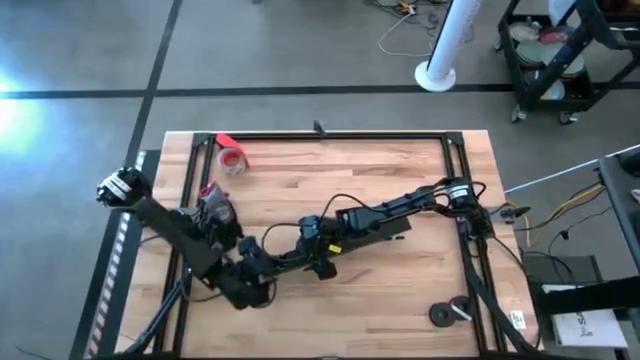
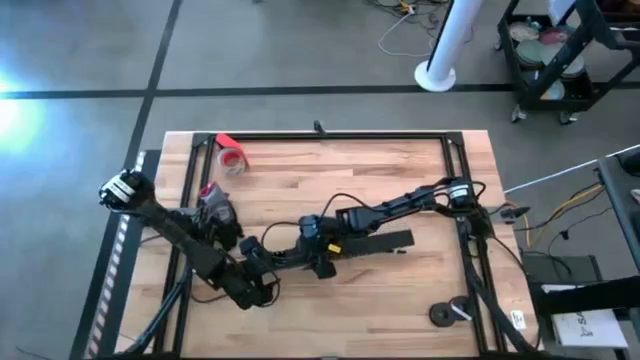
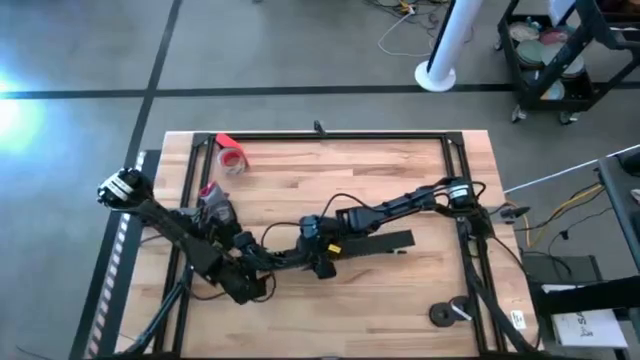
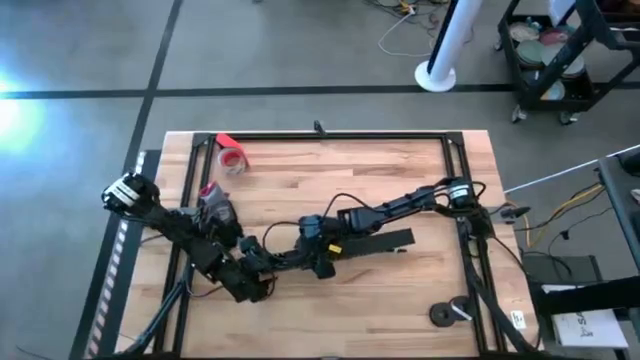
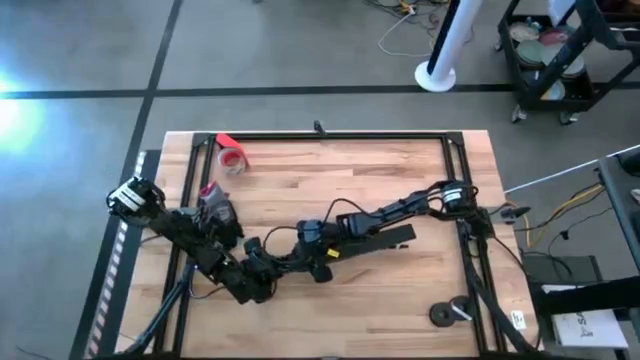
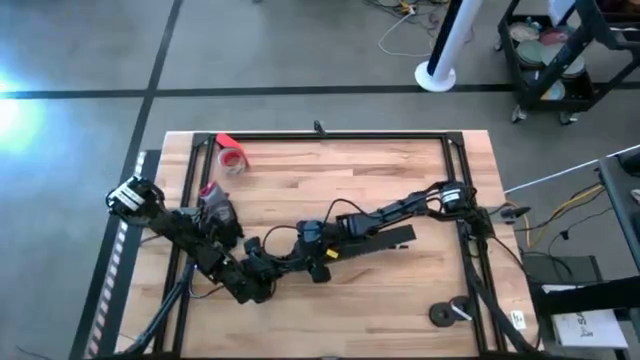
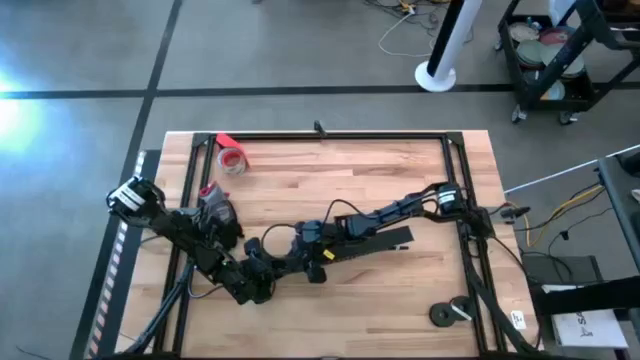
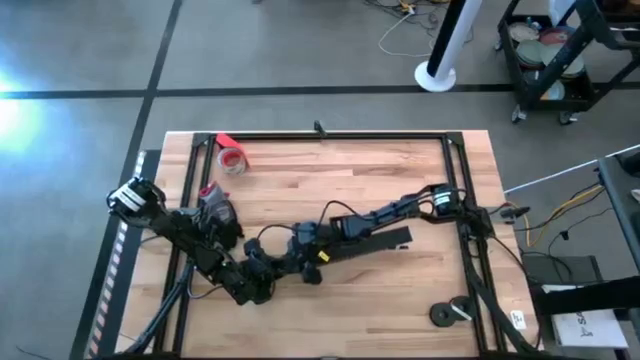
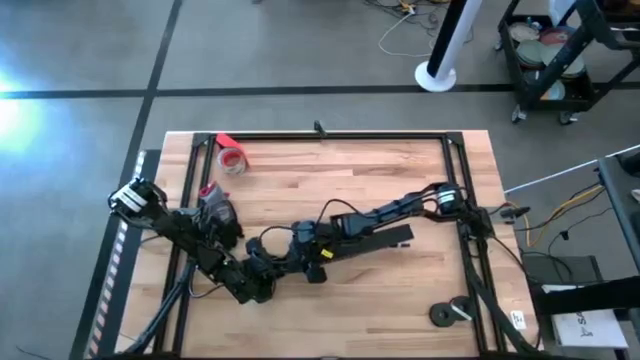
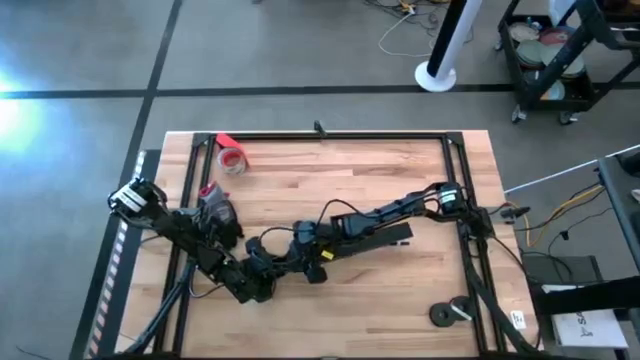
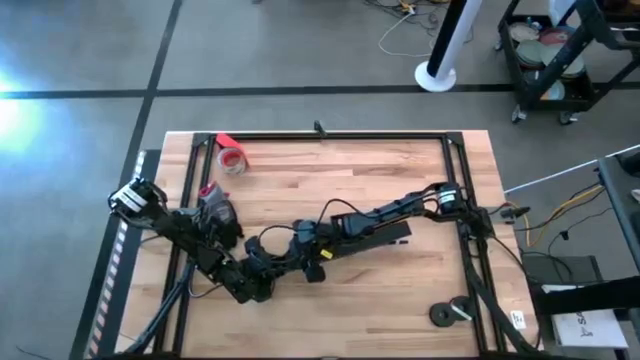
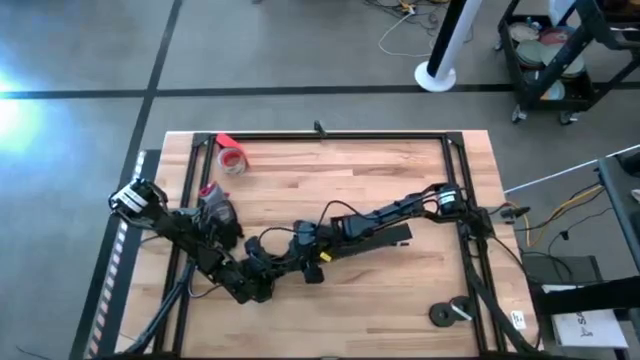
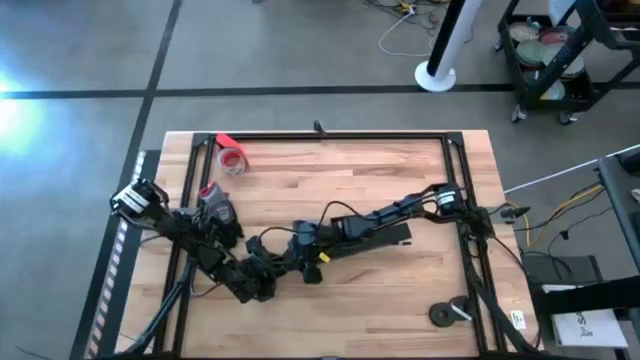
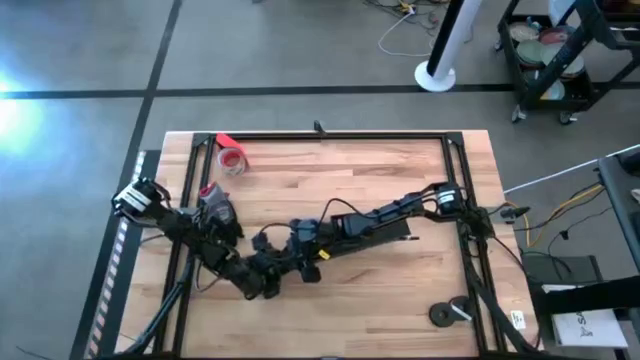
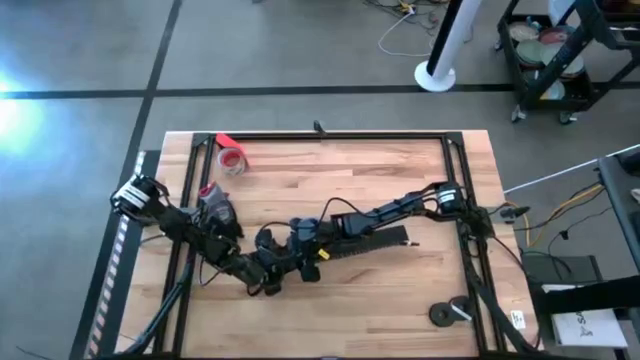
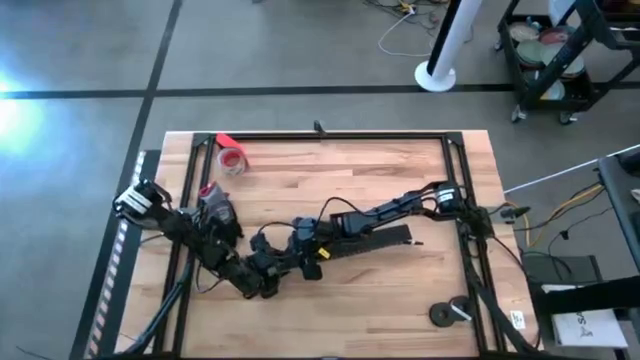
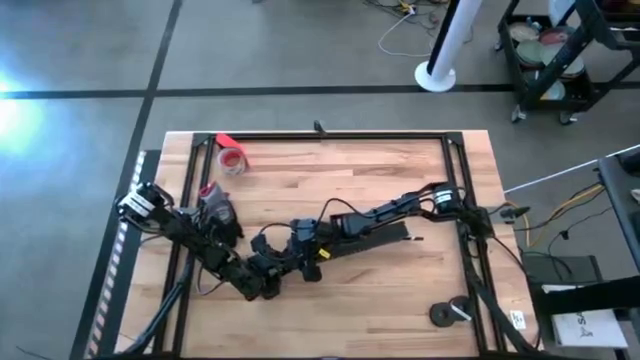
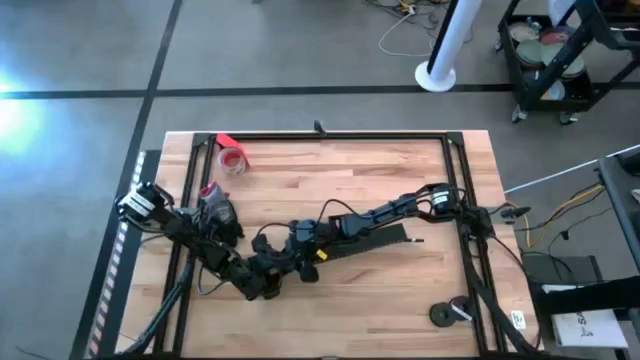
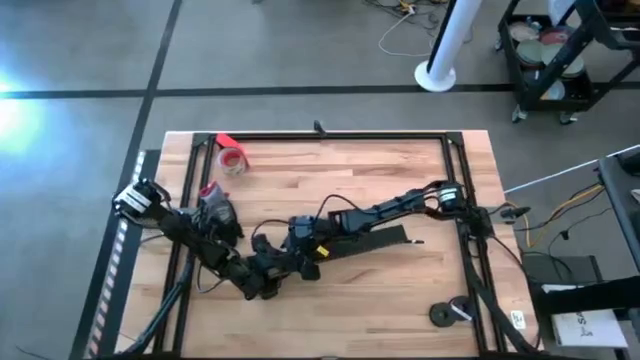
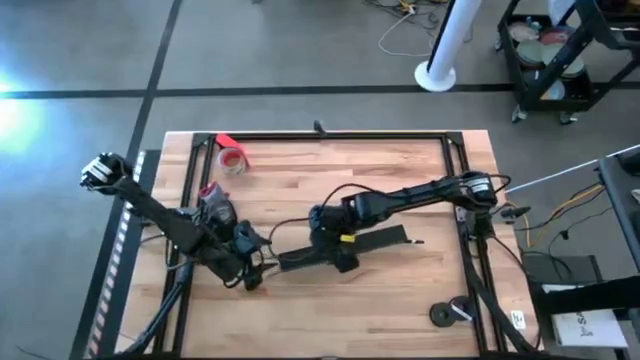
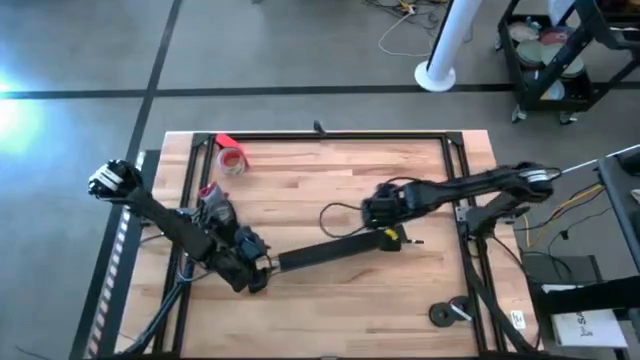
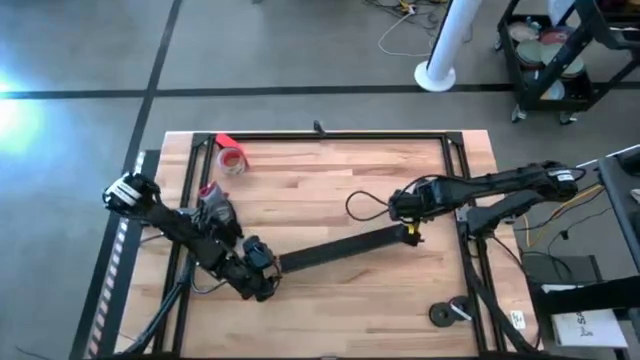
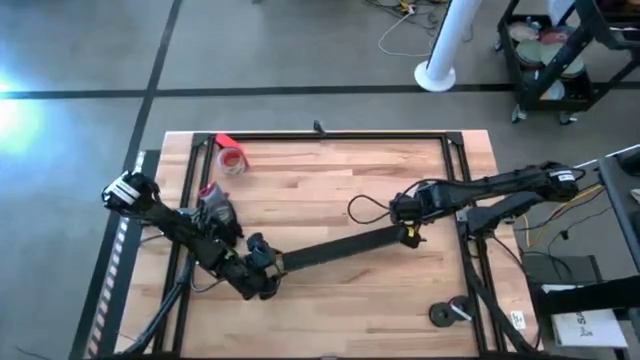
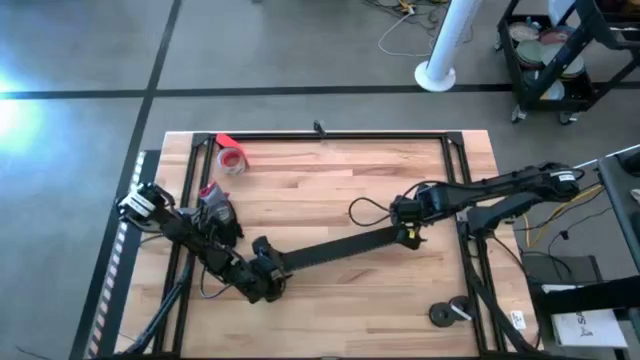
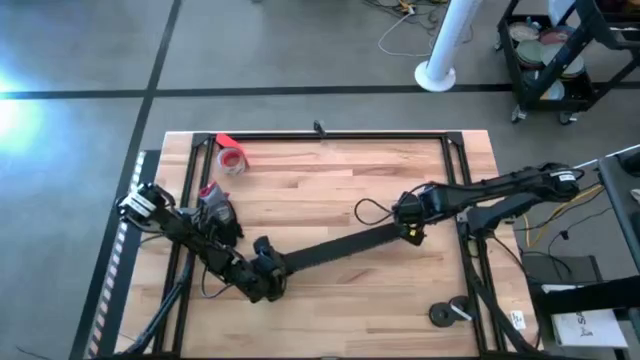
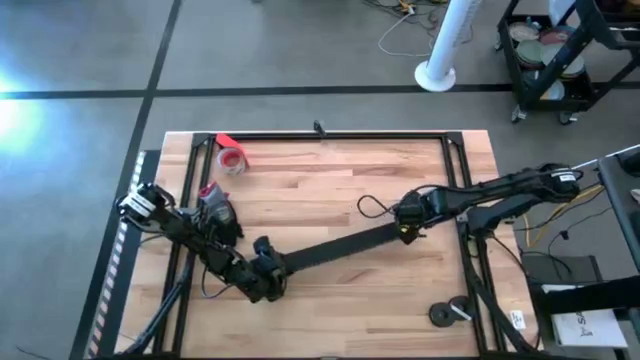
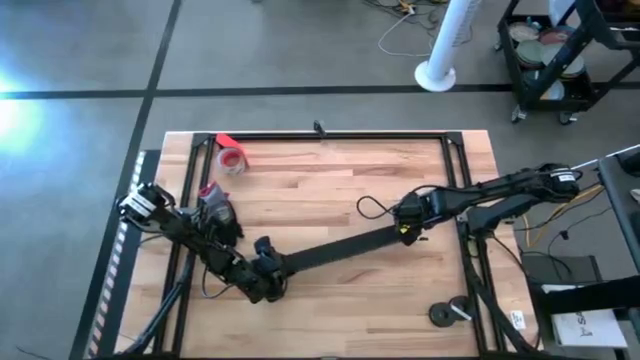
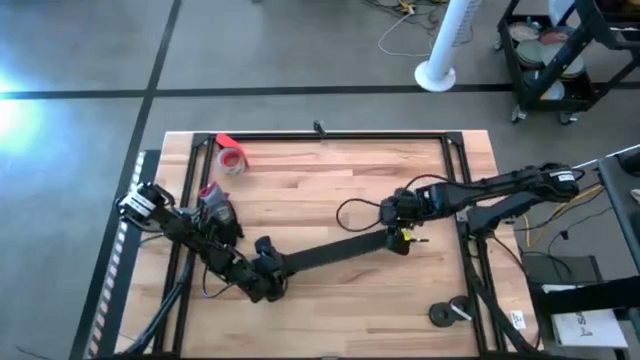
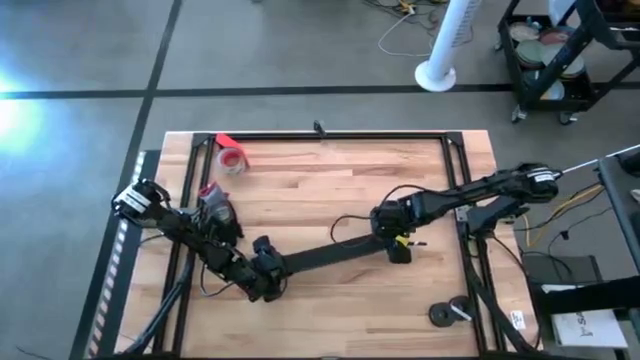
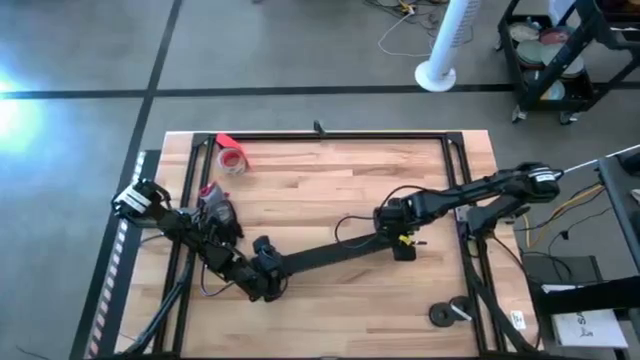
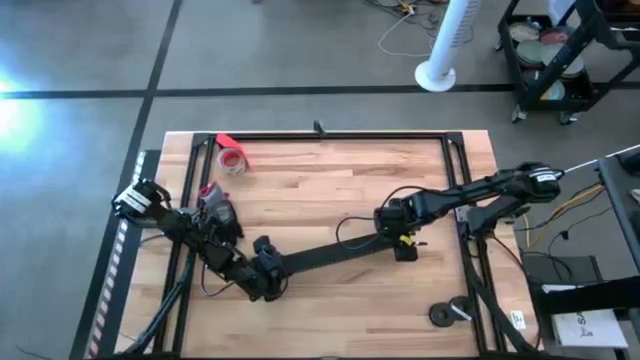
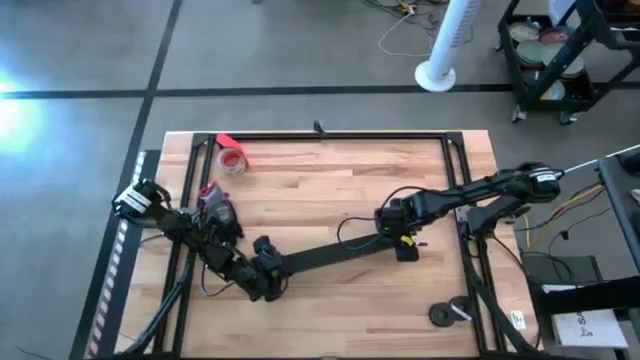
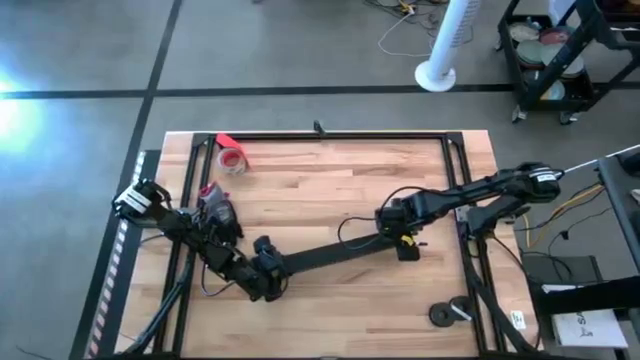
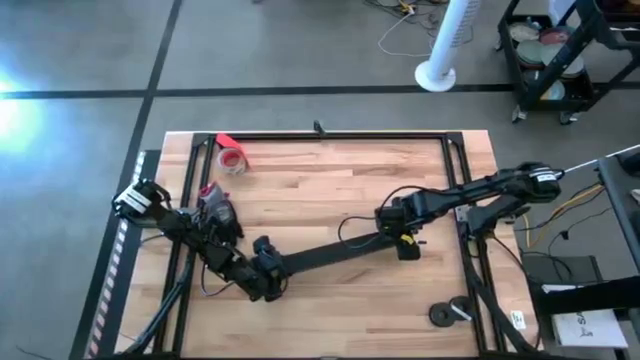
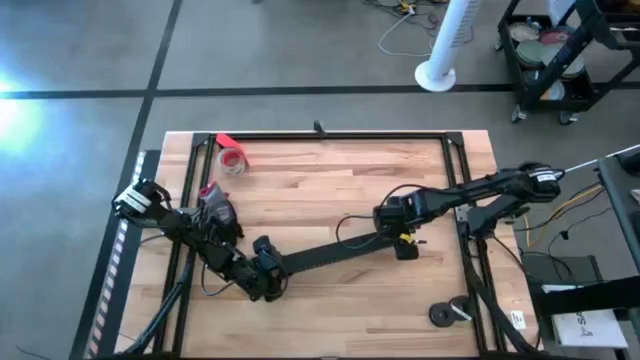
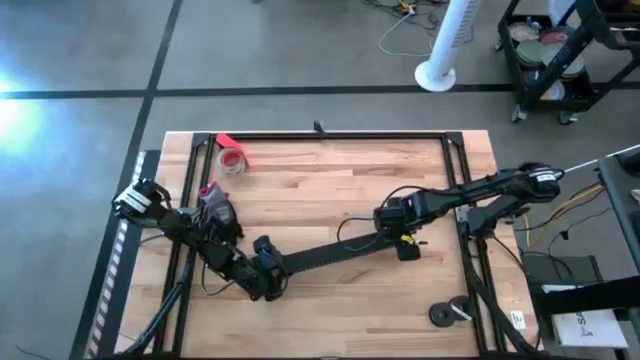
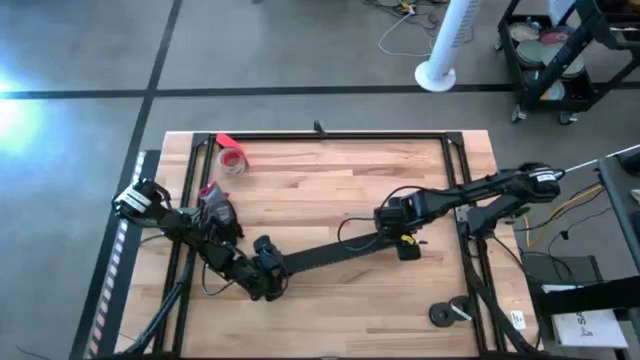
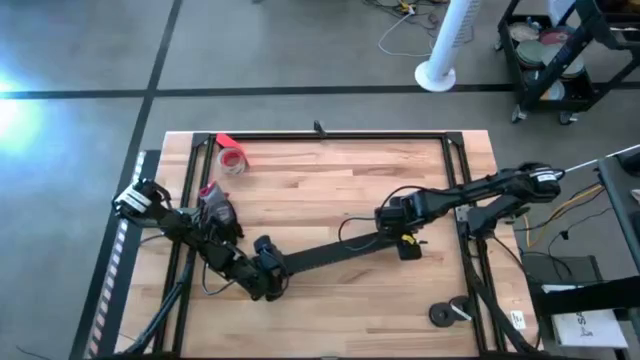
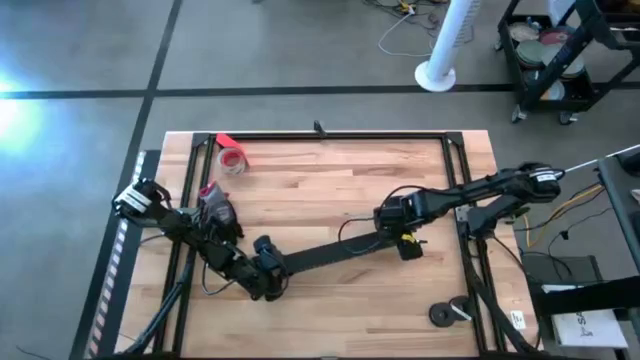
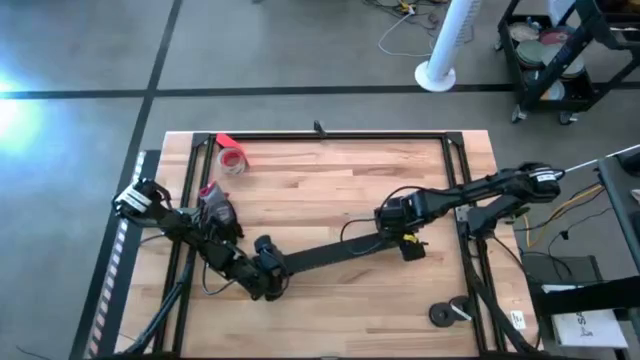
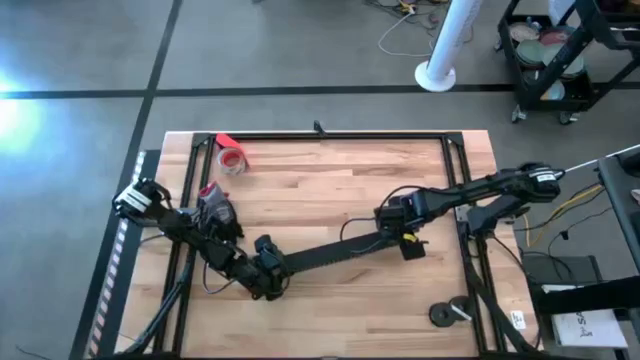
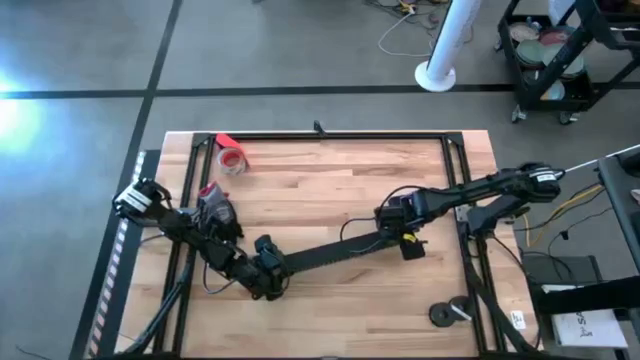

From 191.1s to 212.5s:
Task: Ziptie cables
Close the black cable duct

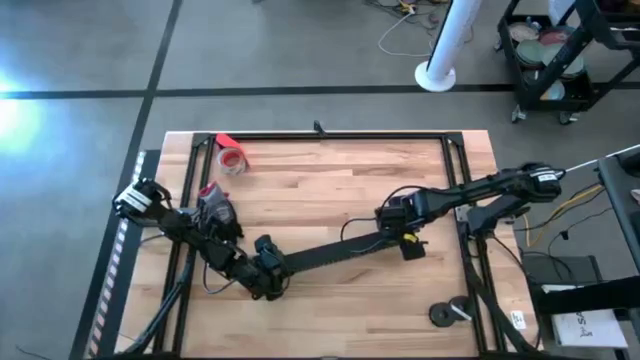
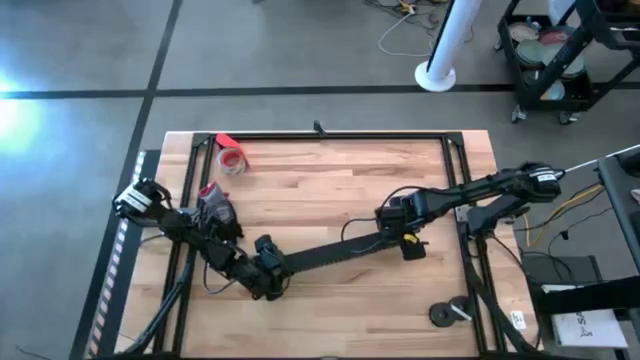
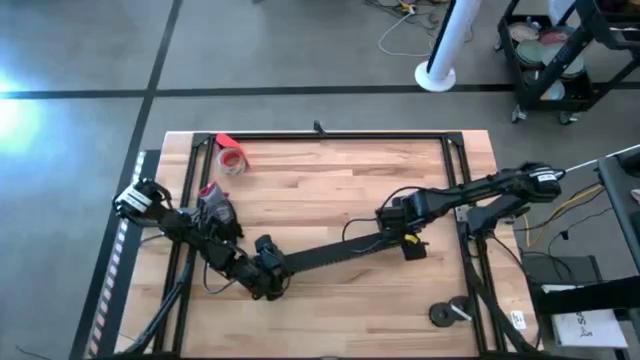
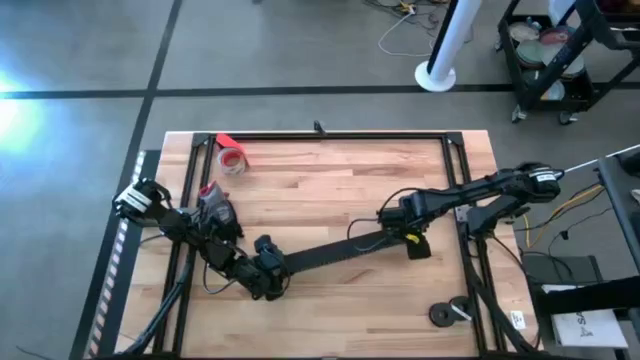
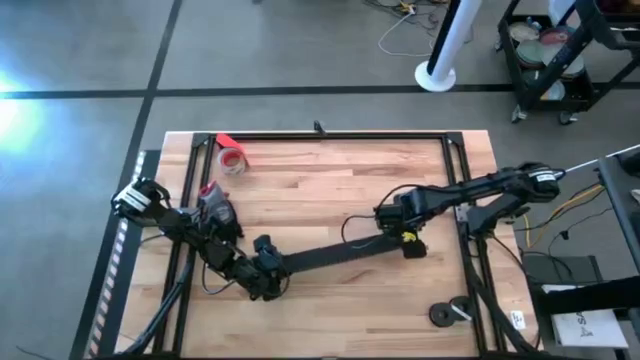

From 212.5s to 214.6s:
Close the black cable duct
